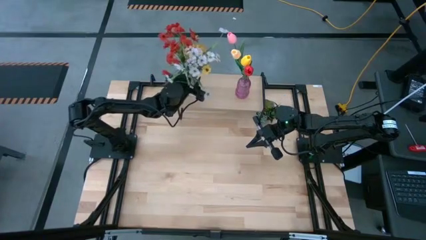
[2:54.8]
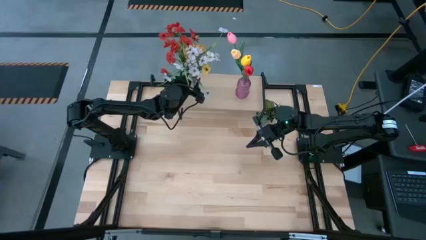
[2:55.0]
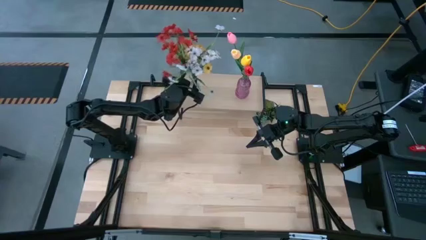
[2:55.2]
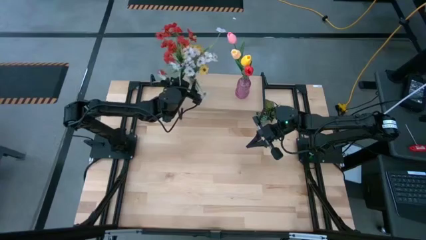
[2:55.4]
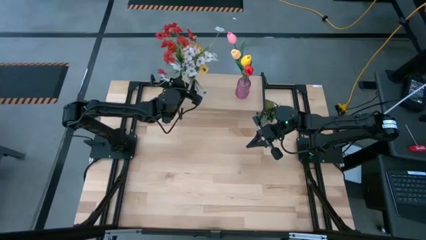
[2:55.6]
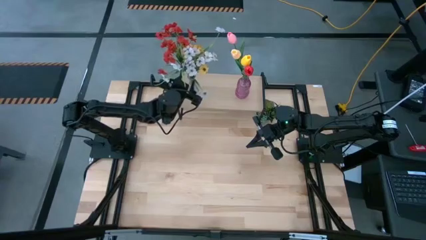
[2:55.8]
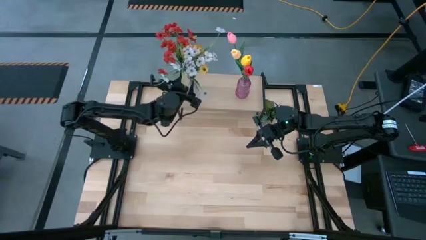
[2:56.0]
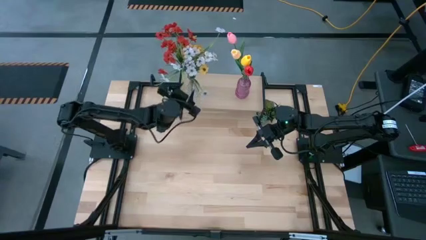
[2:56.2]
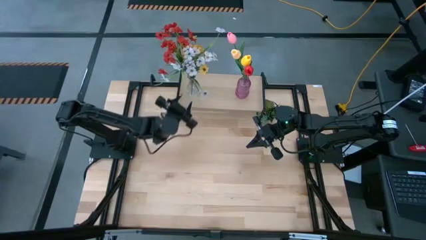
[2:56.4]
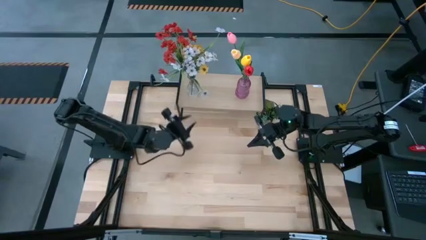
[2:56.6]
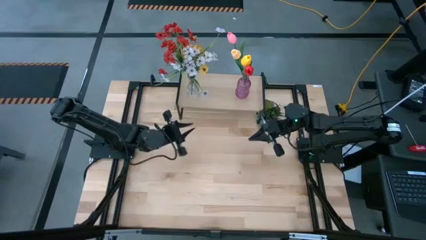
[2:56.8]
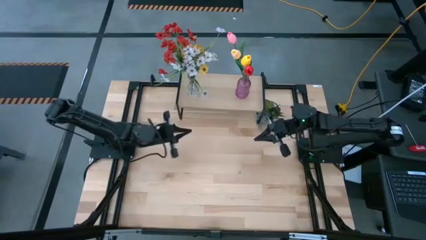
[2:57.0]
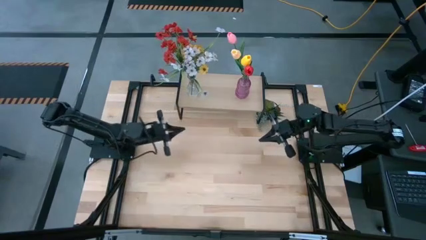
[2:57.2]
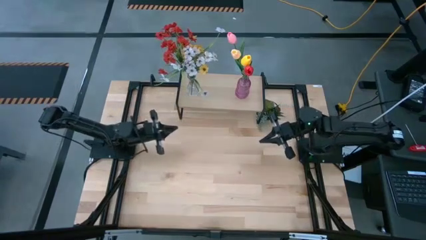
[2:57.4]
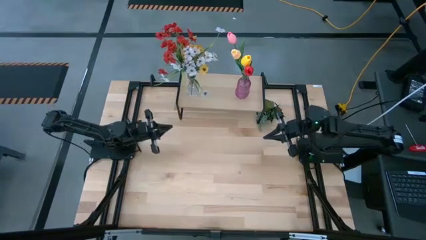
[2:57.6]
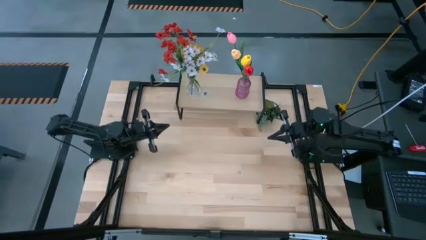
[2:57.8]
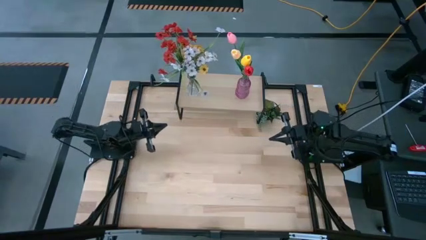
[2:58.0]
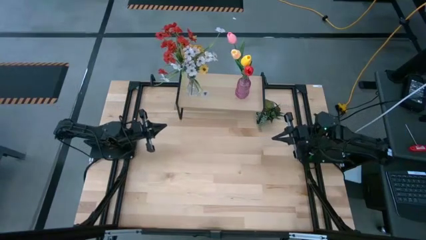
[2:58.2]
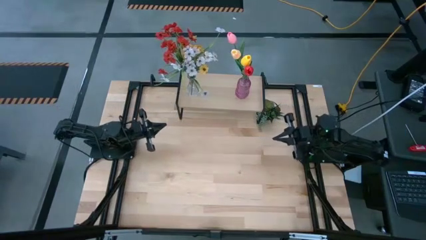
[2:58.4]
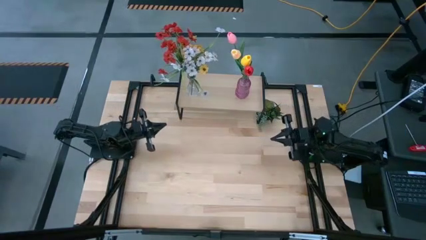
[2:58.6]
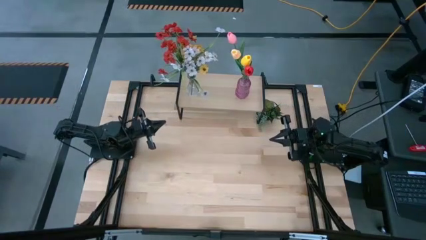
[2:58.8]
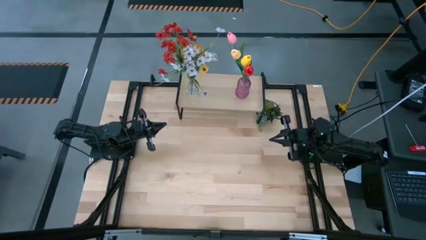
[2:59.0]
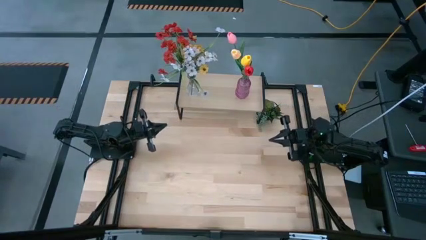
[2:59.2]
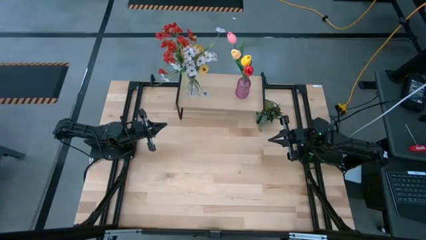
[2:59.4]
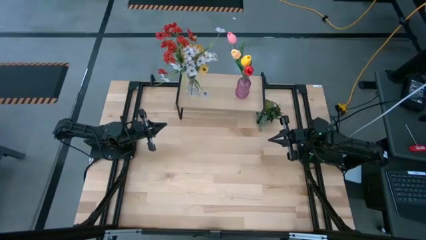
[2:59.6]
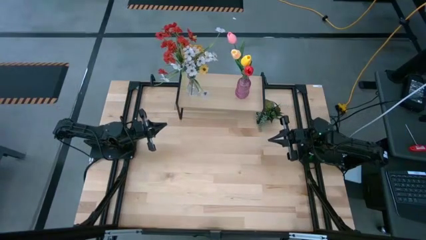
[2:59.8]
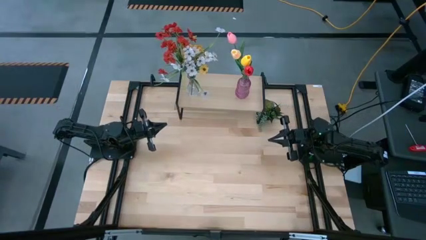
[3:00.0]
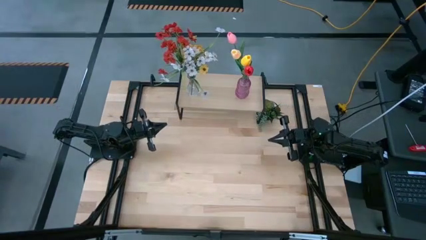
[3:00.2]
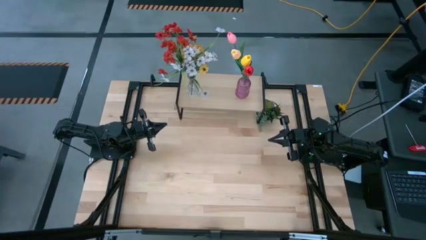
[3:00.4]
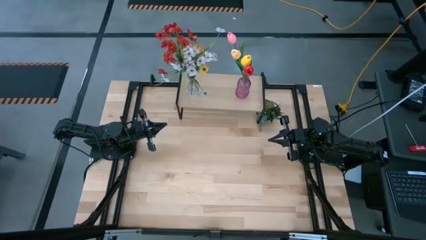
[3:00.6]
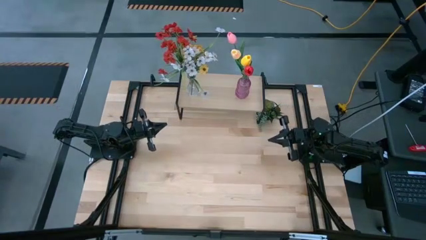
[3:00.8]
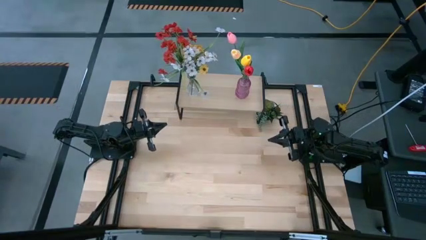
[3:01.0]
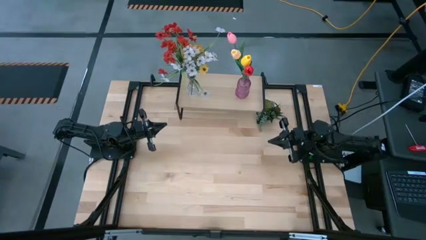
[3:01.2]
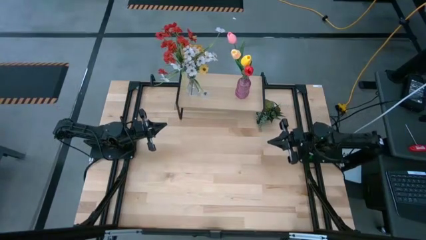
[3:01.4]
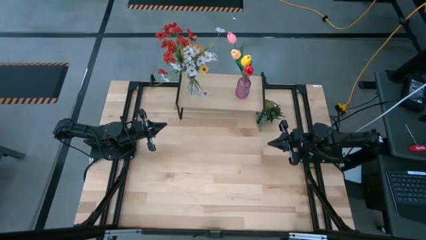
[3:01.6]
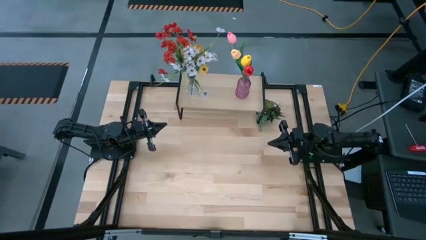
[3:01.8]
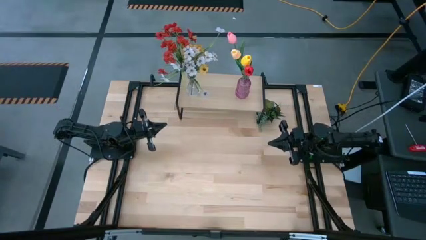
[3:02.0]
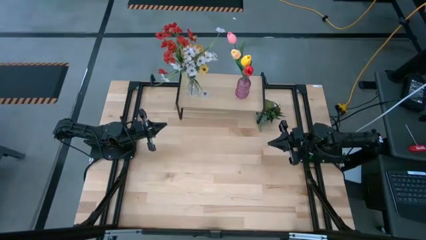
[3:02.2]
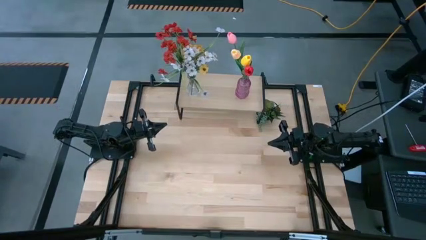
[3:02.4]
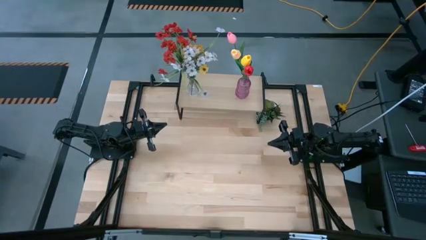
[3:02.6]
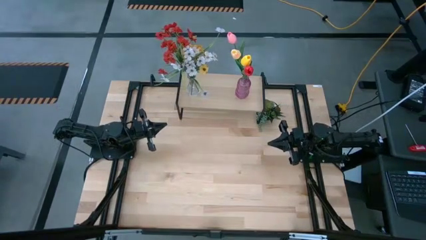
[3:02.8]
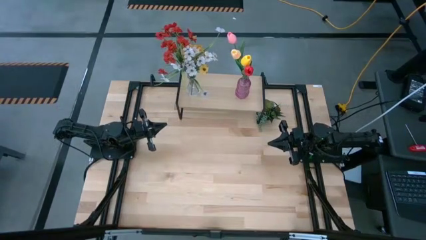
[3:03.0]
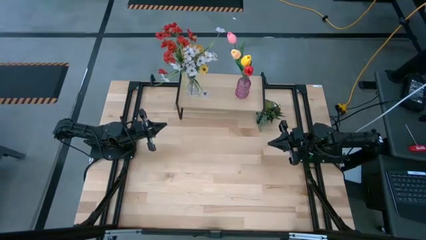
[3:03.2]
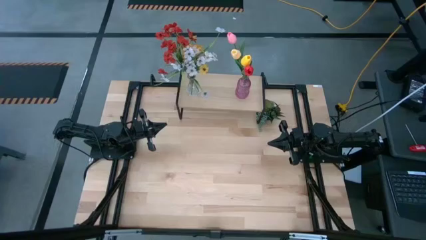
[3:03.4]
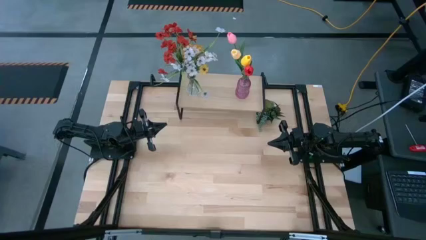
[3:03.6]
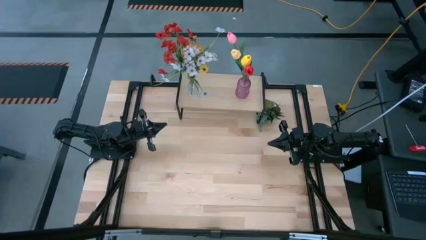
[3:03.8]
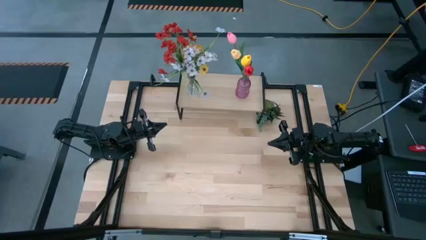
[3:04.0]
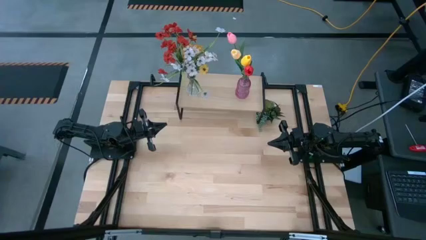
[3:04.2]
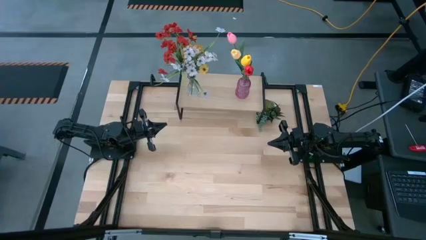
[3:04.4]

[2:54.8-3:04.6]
Task: Pick and place flowers into a vace then onto a shelf
Return to Home Position
